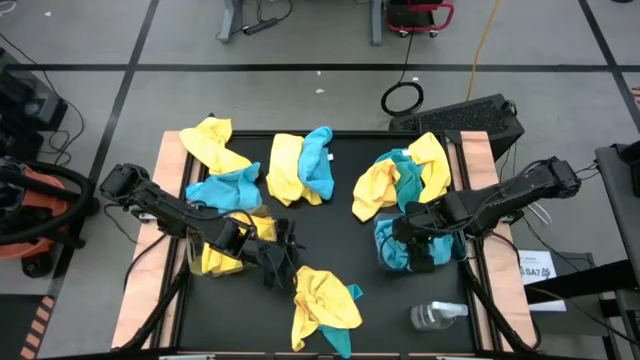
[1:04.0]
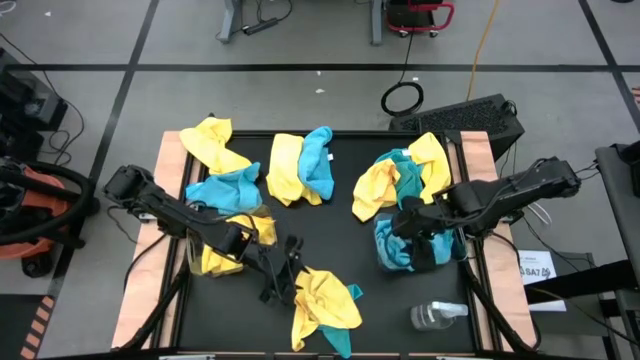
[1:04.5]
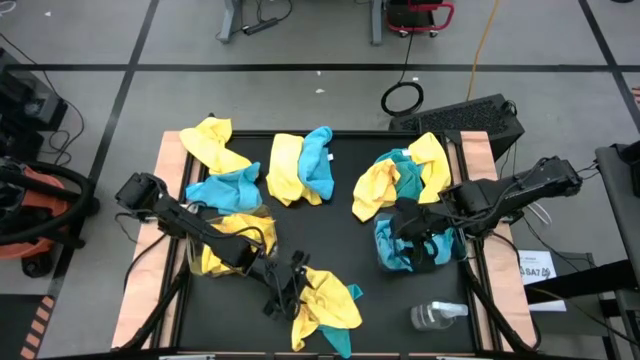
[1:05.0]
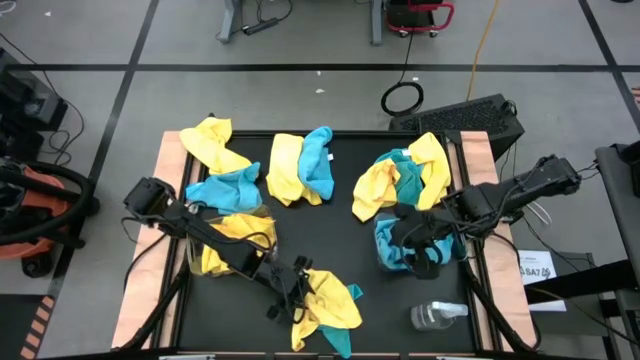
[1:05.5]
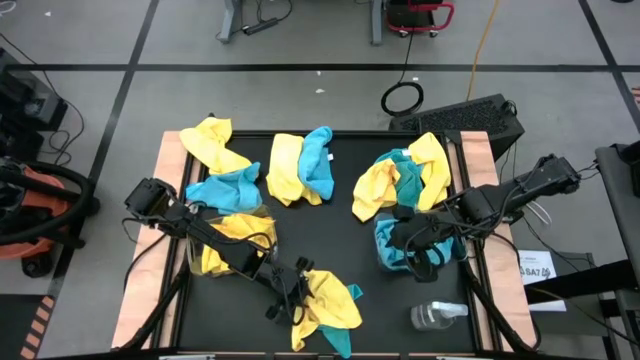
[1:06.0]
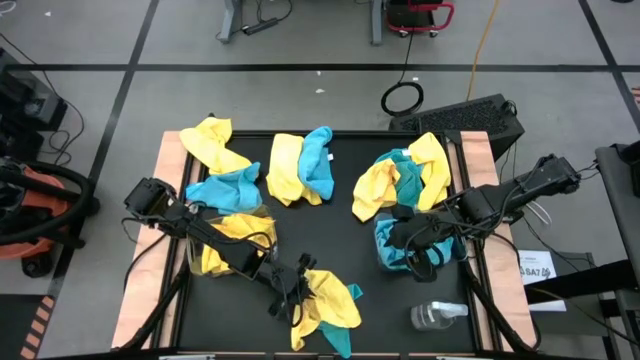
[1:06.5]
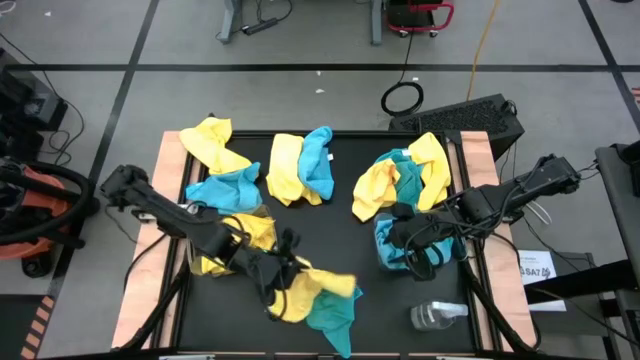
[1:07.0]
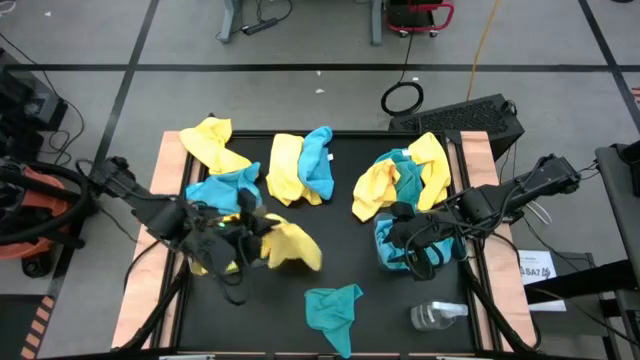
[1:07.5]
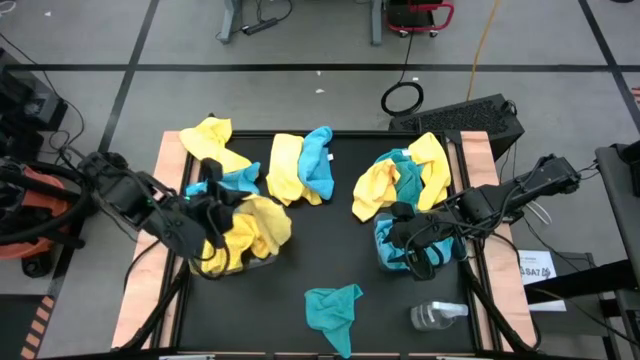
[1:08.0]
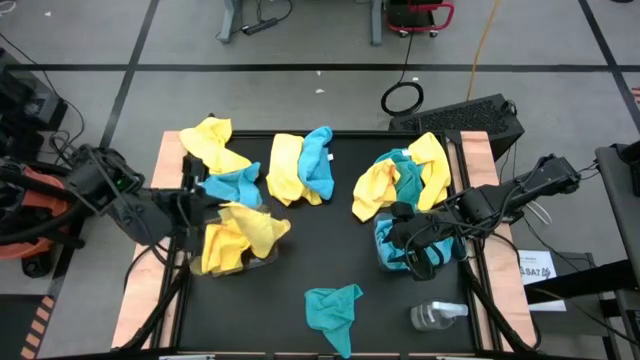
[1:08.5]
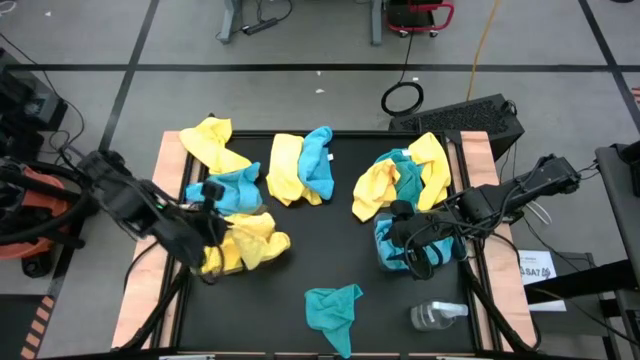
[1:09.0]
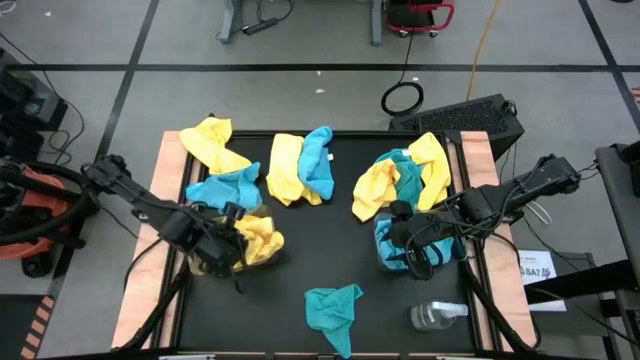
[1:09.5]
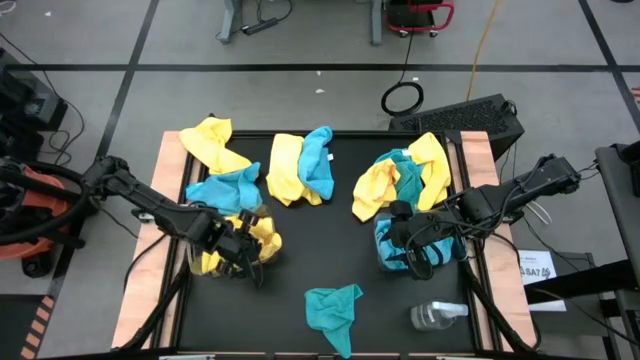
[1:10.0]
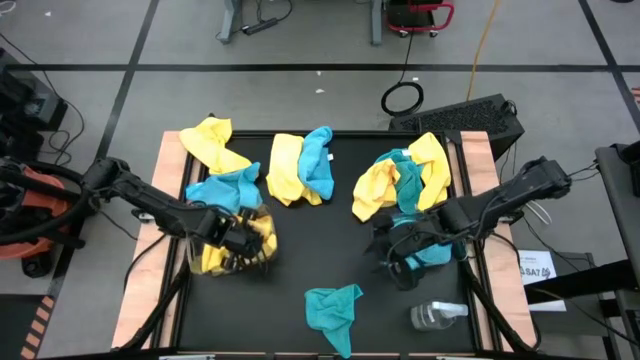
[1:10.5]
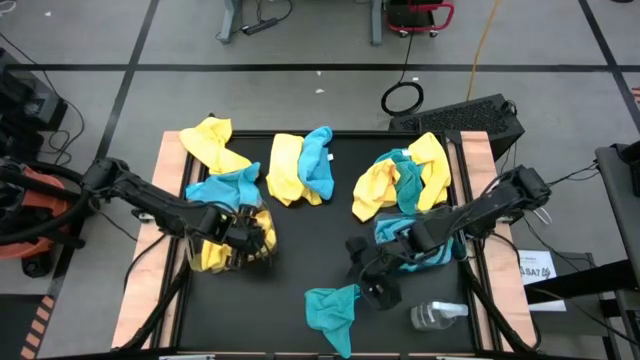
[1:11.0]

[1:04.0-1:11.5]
Task: Sort microfiber towel by color & place in baskets
Put the yellow microfiber towel into the left transparent bin

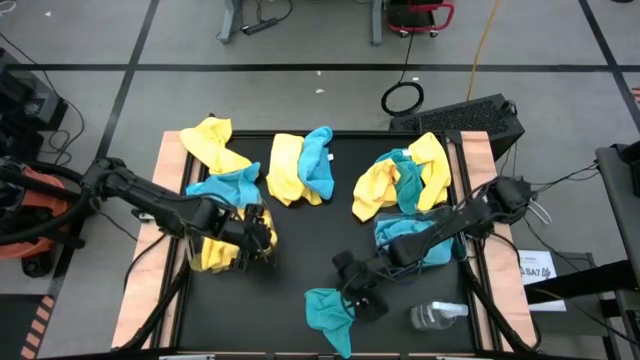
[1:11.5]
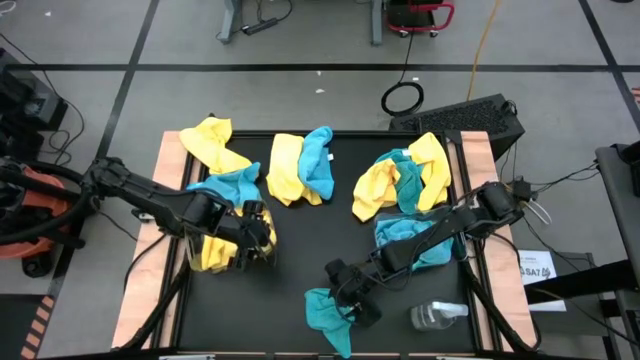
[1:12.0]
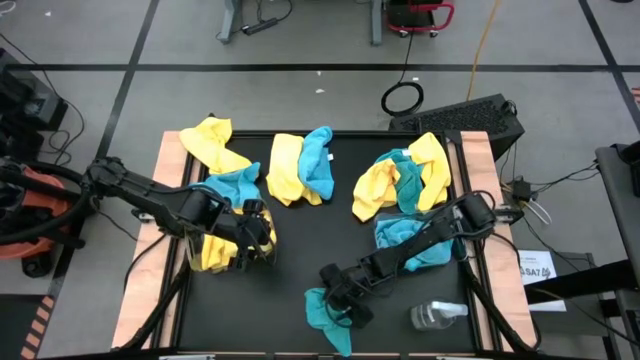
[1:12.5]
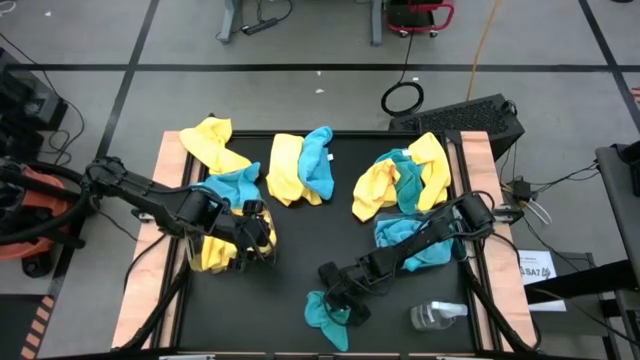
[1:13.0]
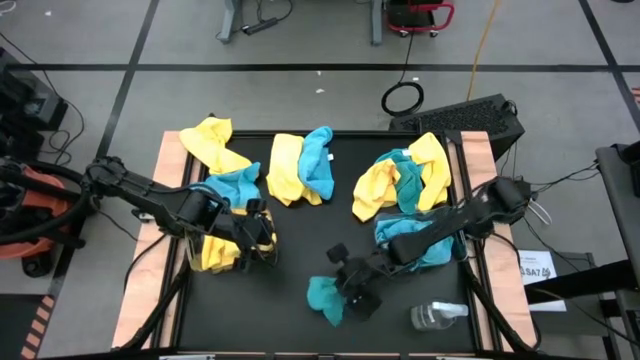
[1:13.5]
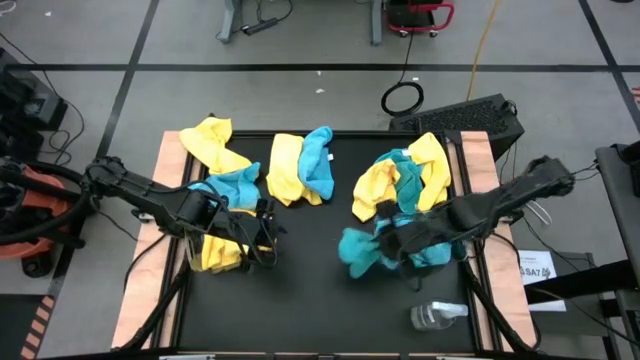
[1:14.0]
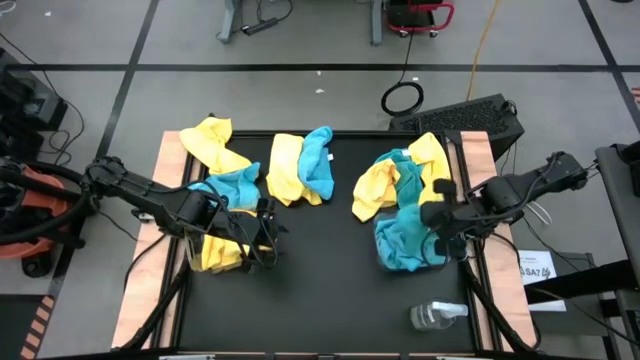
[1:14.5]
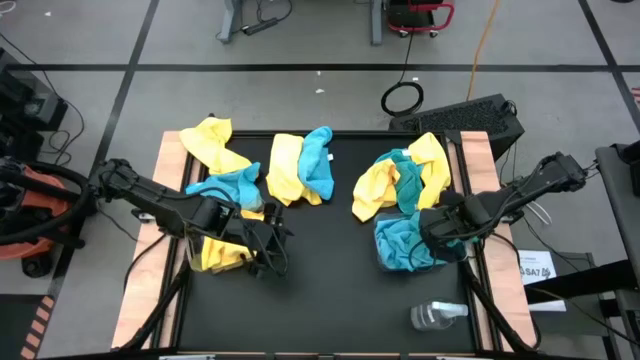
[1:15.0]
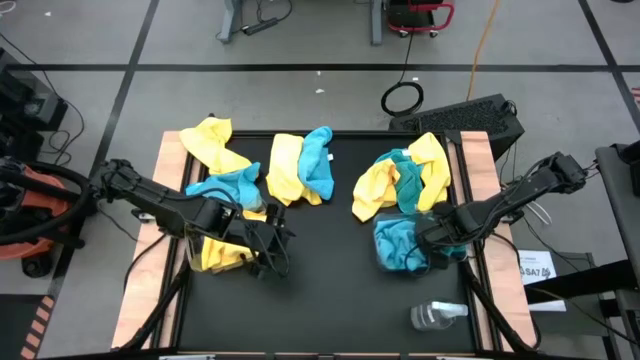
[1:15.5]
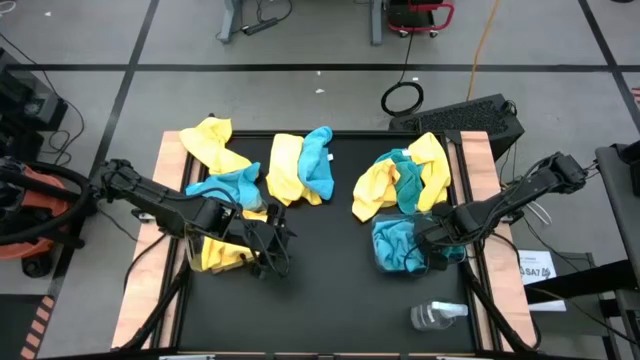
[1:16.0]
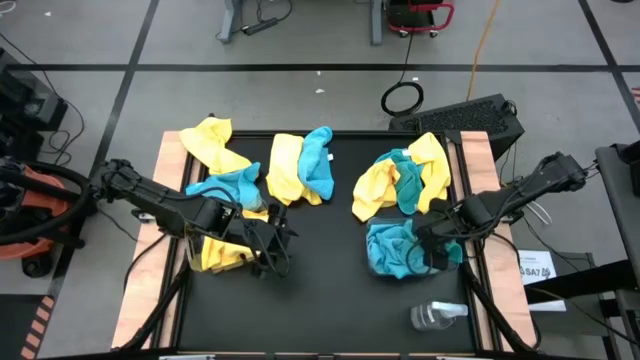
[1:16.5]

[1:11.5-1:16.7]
Put the blue microfiber towel into the right transparent bin

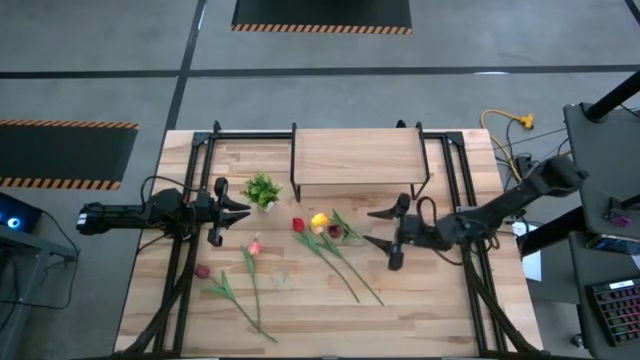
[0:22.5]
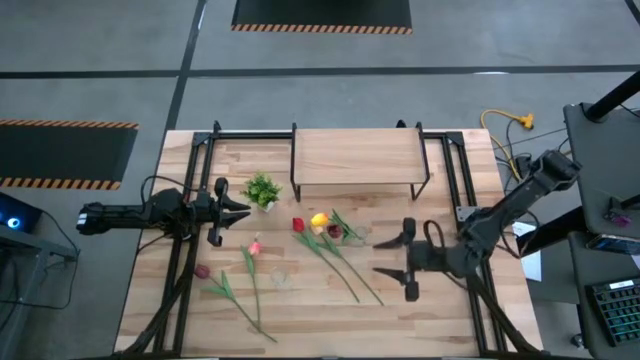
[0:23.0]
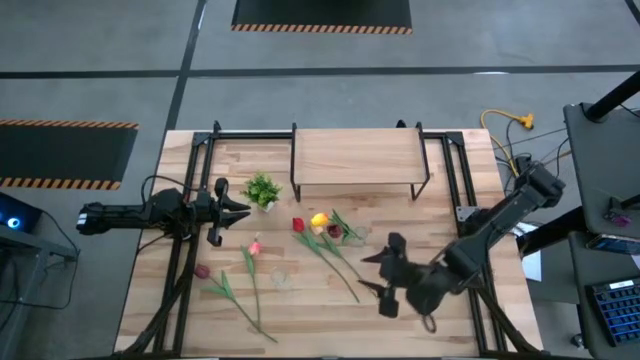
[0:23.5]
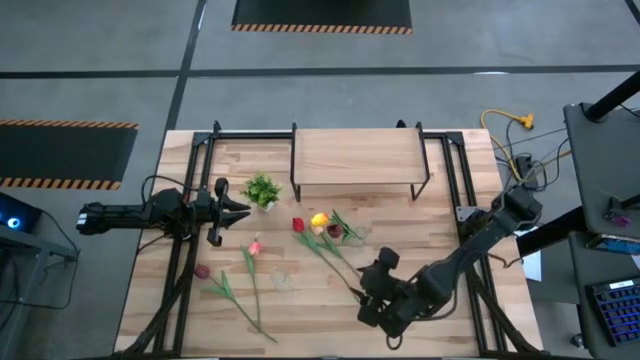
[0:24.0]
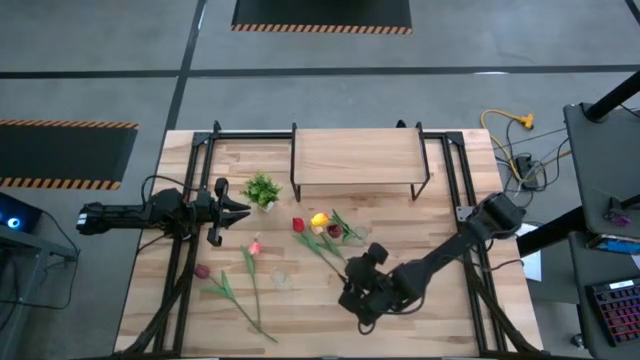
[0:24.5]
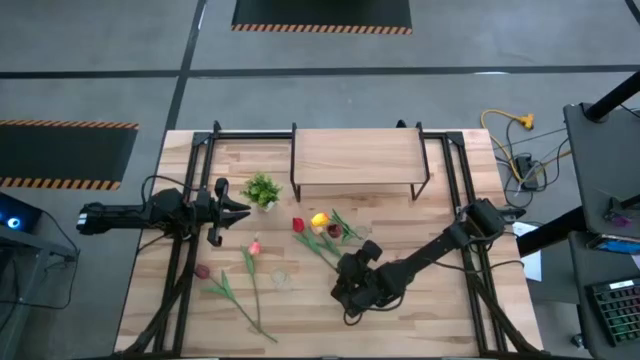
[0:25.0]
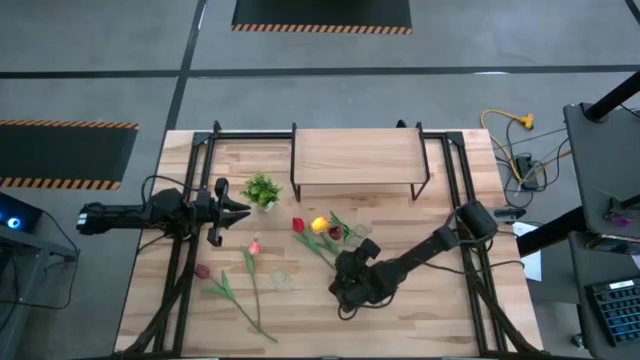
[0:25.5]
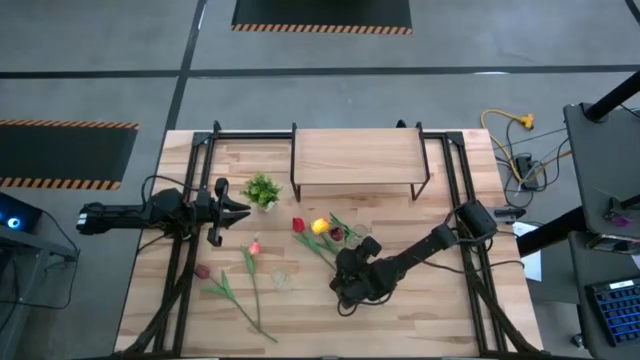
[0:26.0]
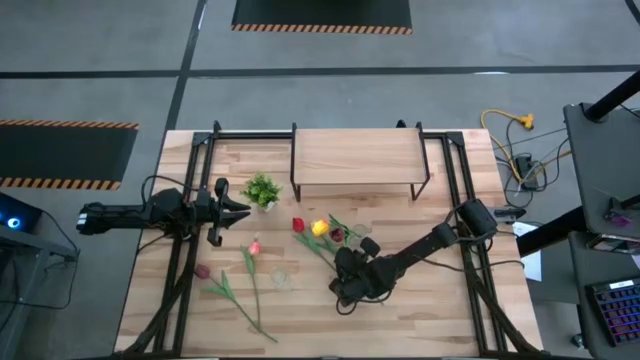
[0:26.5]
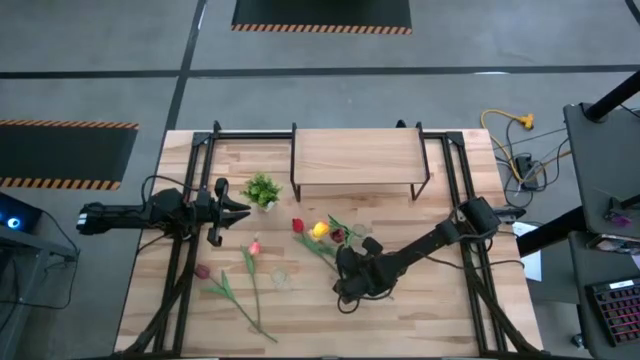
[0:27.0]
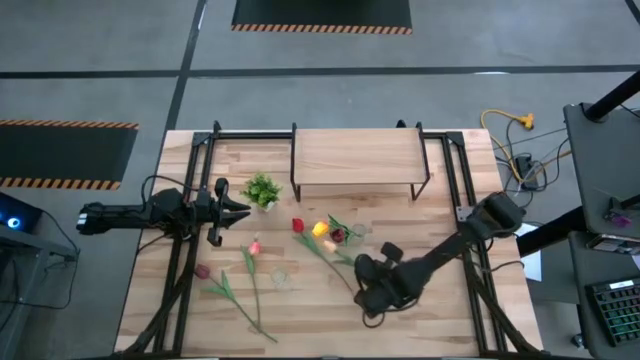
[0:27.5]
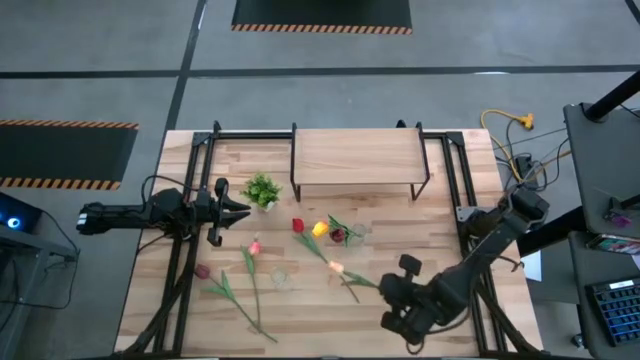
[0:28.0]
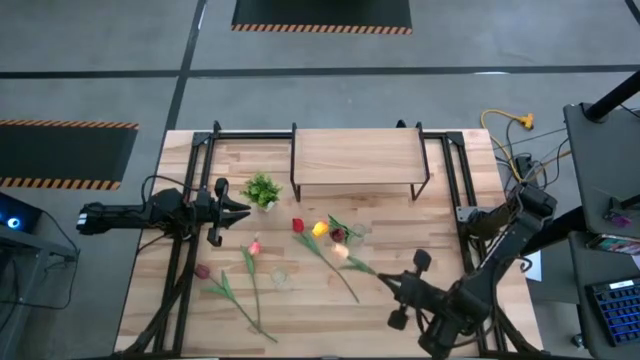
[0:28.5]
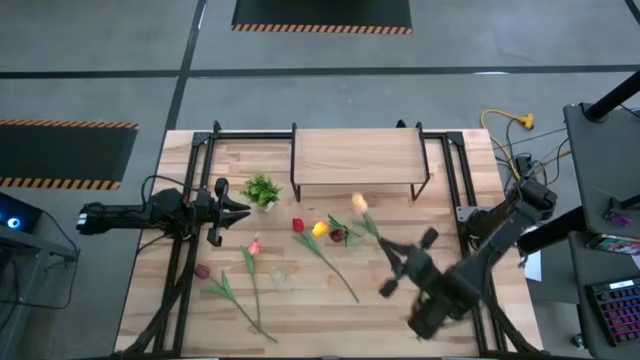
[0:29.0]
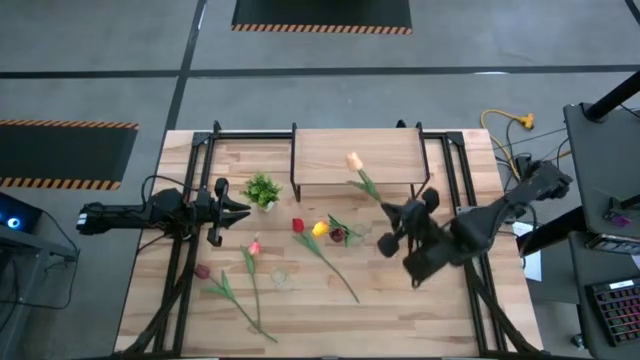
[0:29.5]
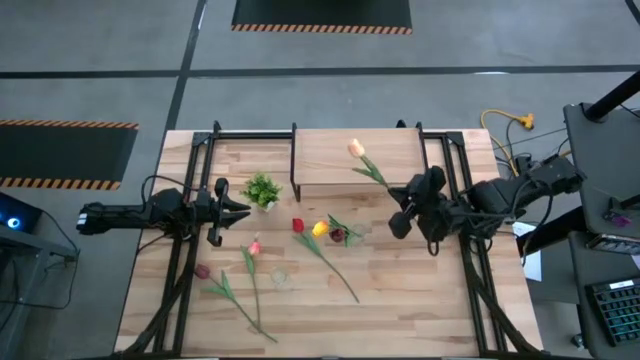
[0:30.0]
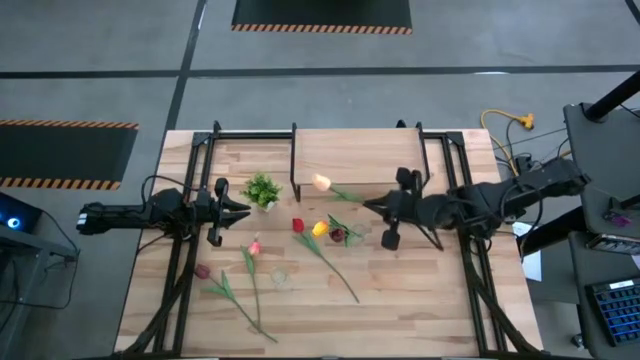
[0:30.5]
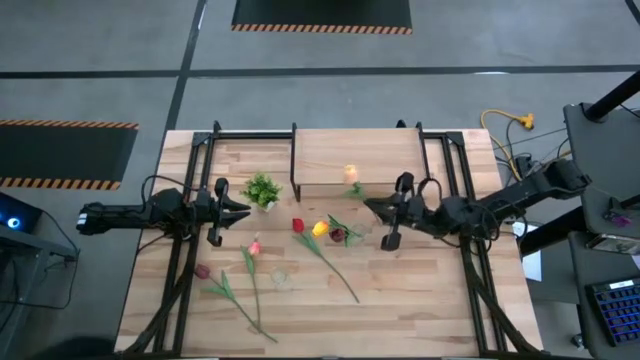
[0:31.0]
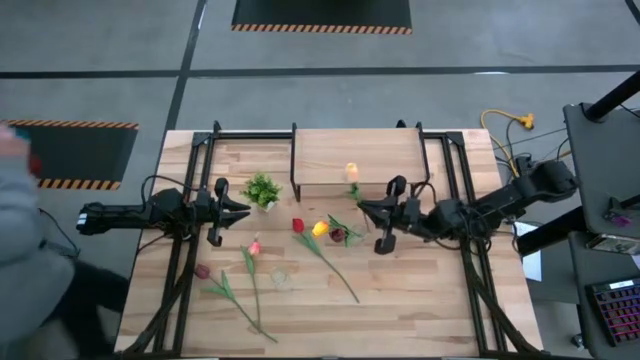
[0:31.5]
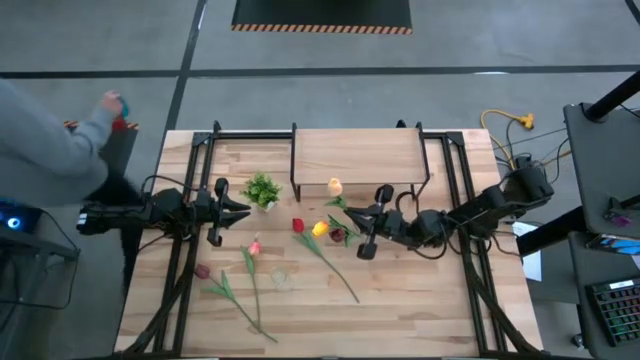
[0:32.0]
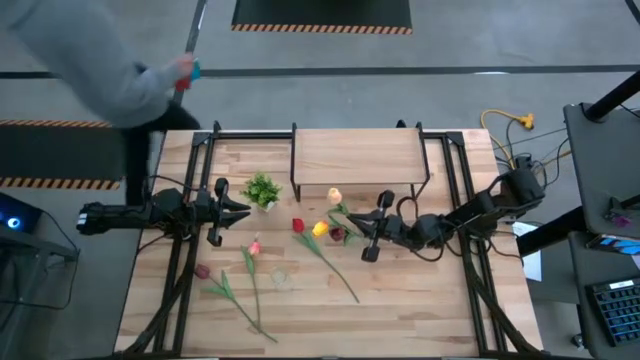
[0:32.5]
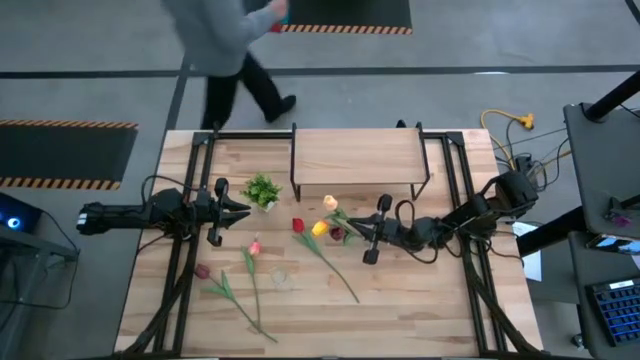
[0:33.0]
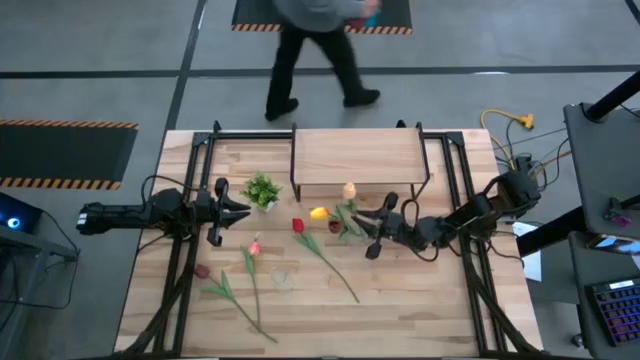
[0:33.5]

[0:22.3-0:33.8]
Task: Pick and place flowers into a vace then onto a shelf
Put the light pink tulip into the right transparent vase
